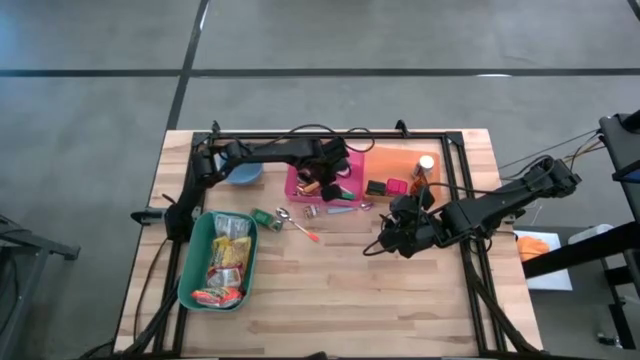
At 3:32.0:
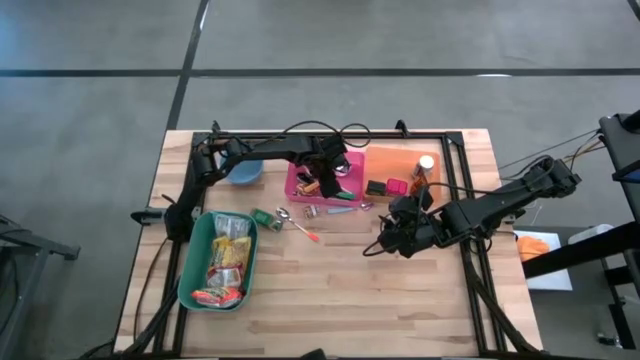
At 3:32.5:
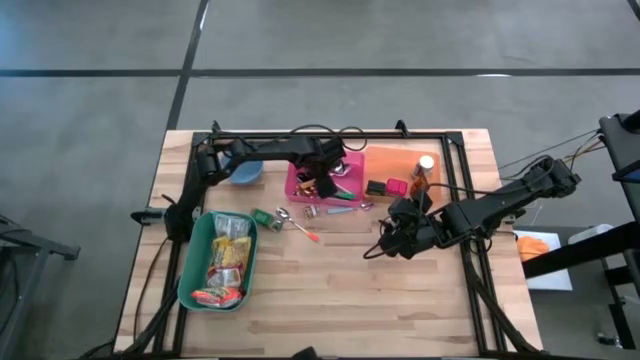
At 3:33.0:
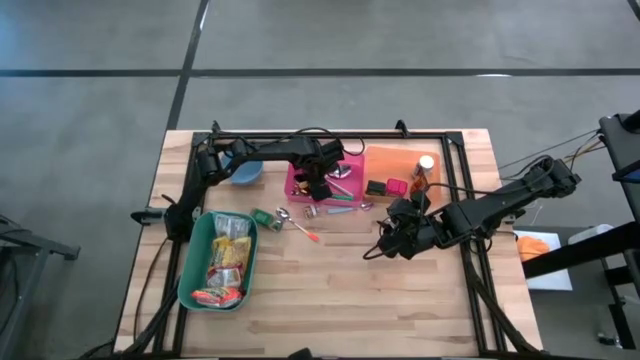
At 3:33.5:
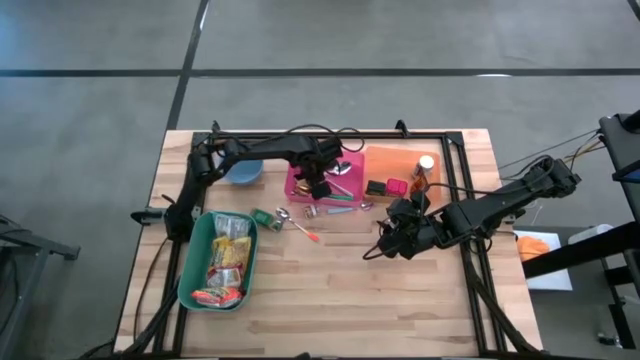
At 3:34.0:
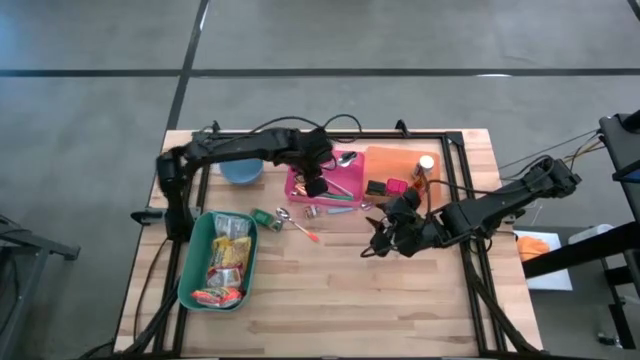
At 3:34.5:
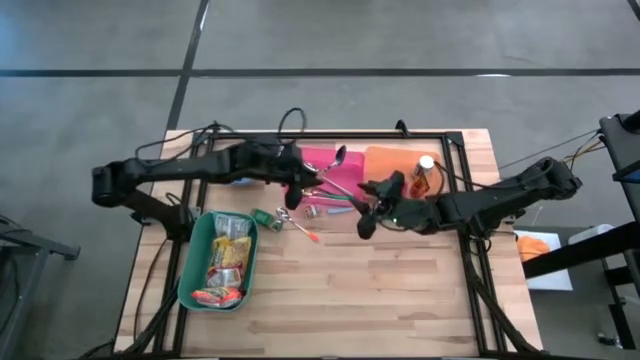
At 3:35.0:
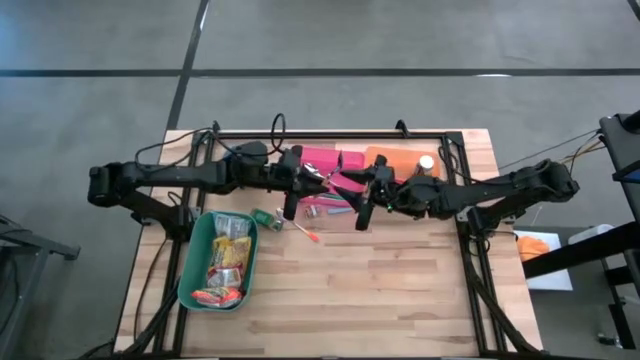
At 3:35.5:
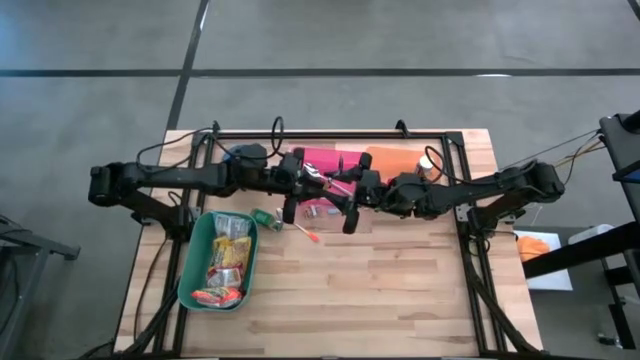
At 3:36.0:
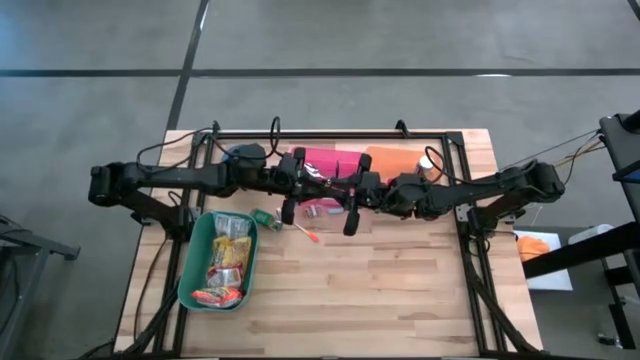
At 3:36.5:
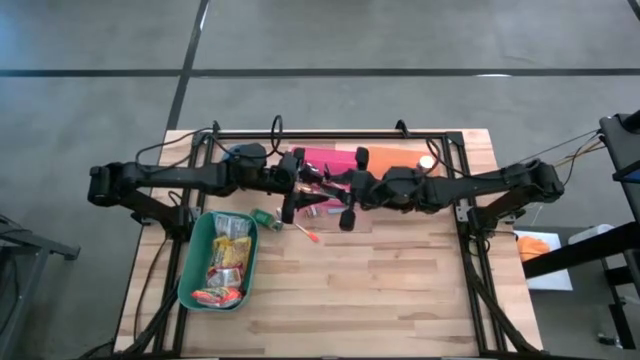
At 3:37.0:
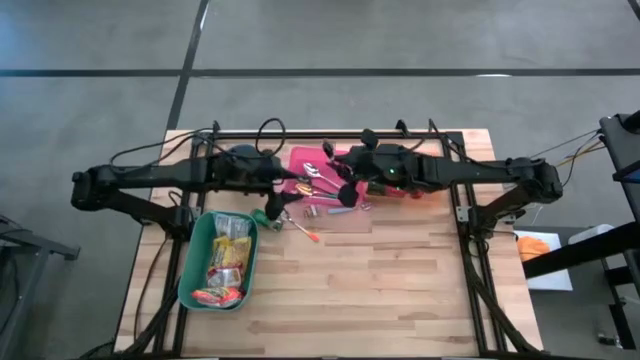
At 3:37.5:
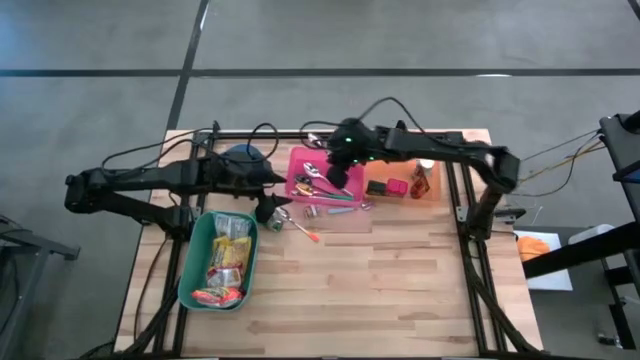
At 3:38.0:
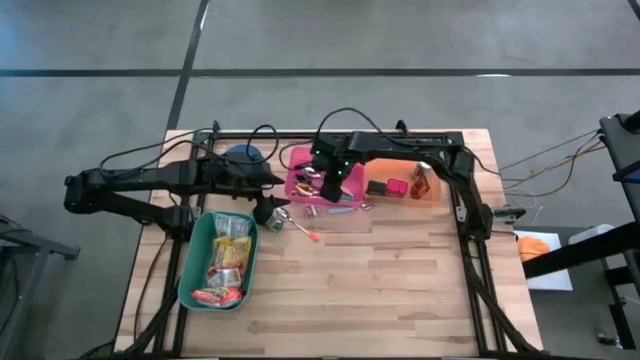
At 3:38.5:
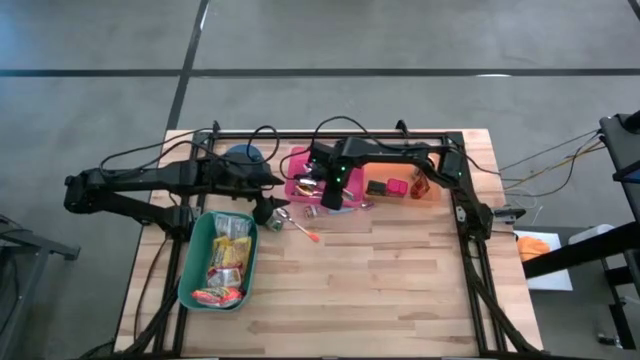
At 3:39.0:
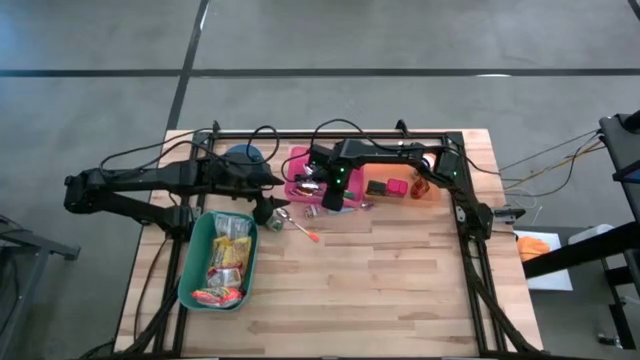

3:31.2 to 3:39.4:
Put the yellow spoon into the pink bin

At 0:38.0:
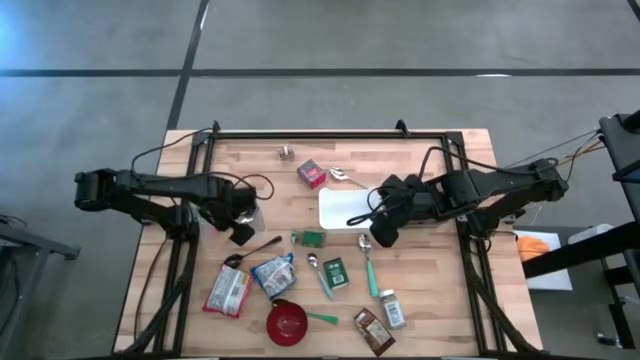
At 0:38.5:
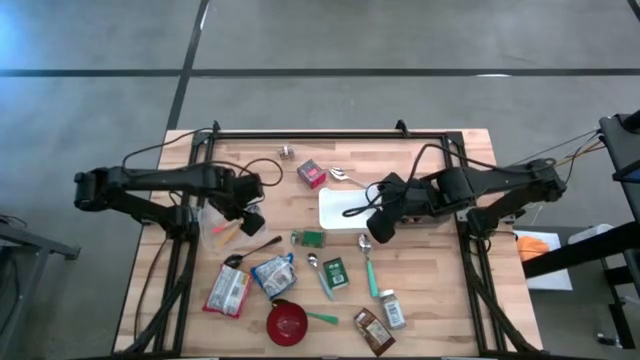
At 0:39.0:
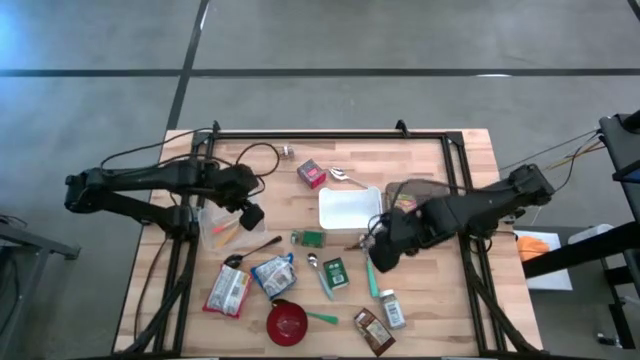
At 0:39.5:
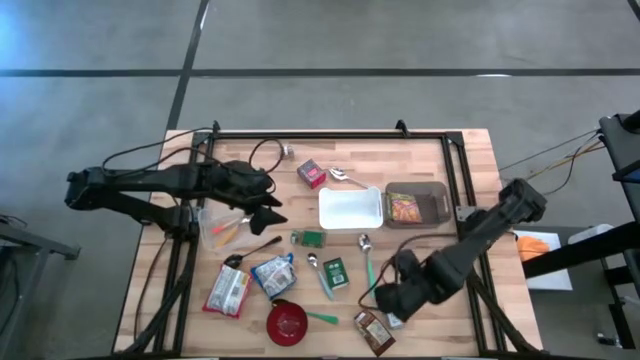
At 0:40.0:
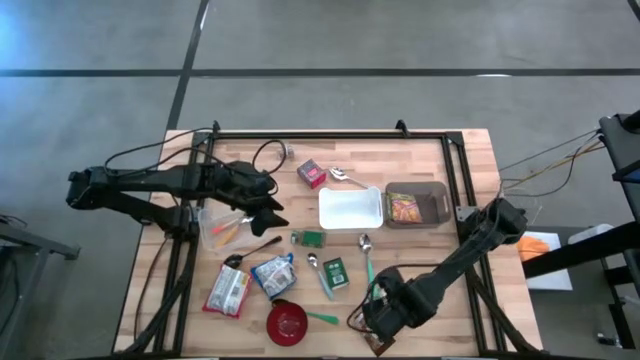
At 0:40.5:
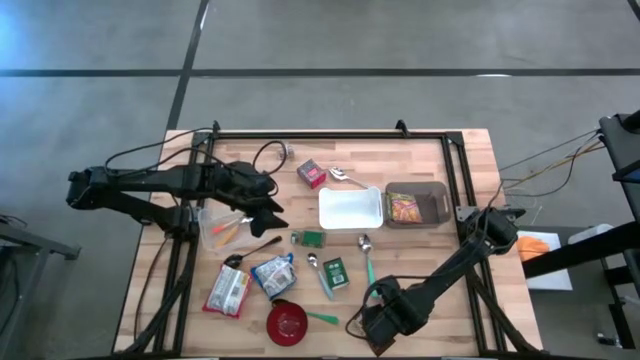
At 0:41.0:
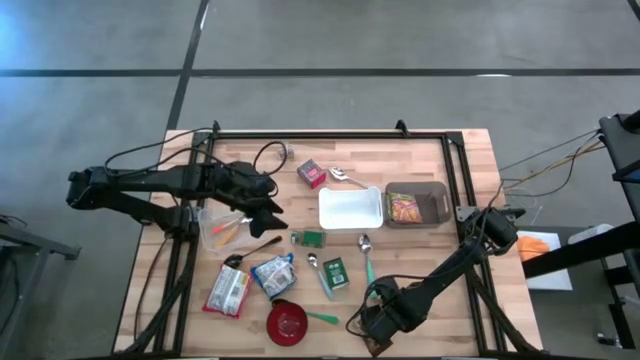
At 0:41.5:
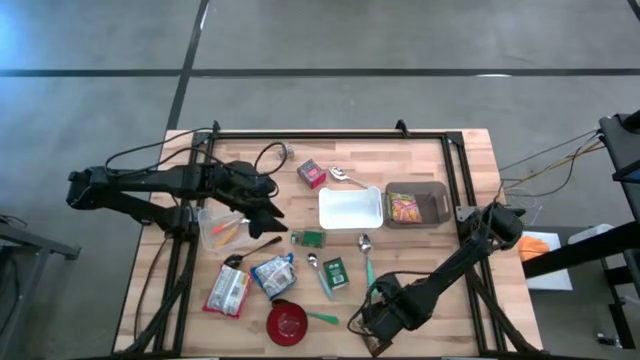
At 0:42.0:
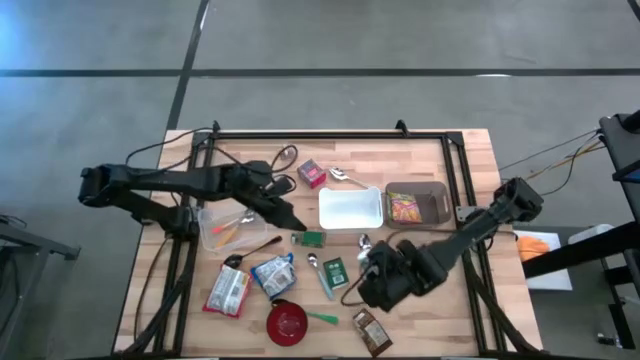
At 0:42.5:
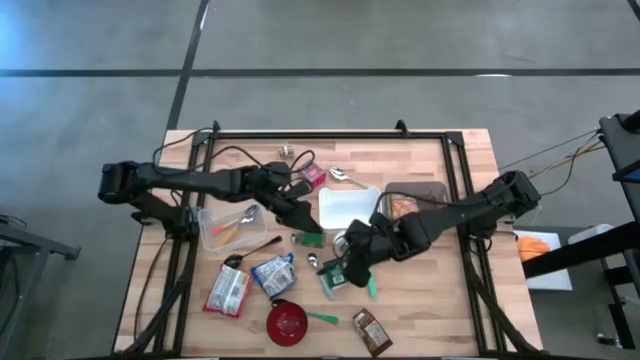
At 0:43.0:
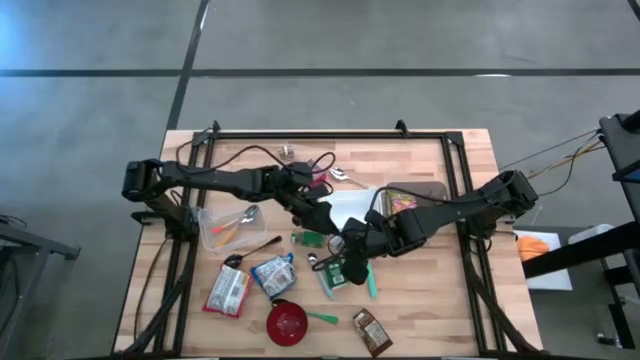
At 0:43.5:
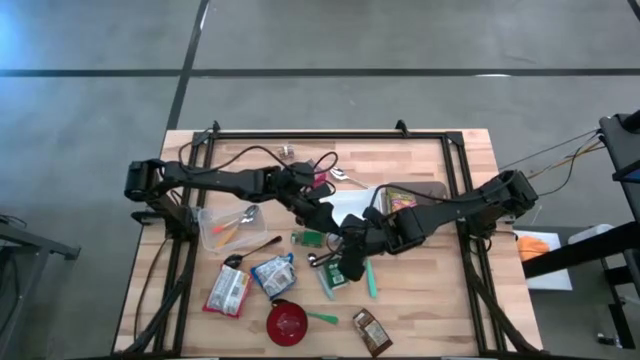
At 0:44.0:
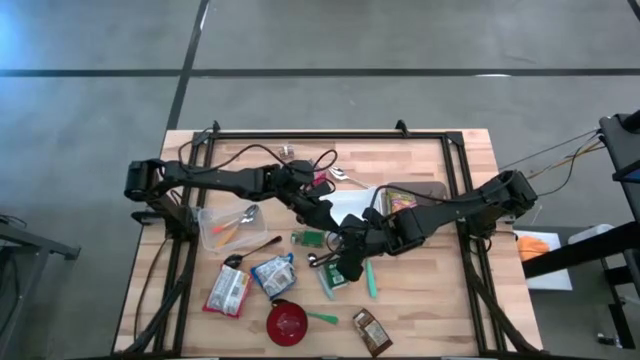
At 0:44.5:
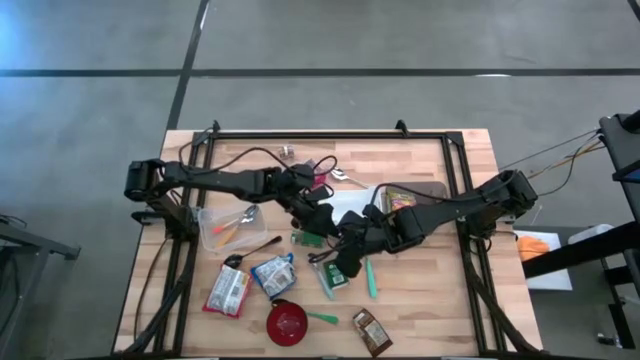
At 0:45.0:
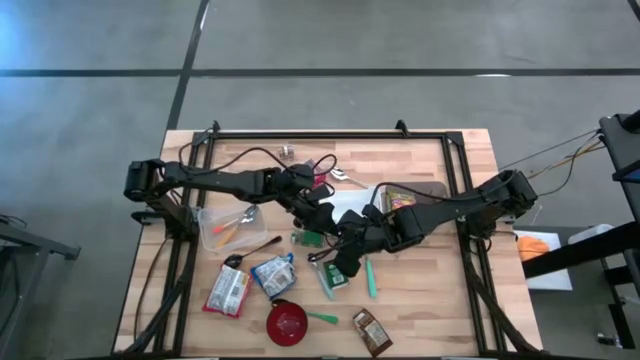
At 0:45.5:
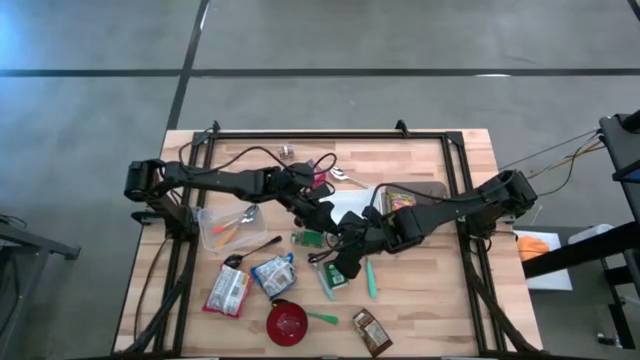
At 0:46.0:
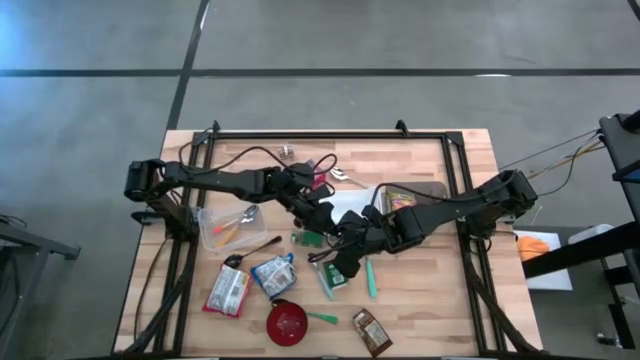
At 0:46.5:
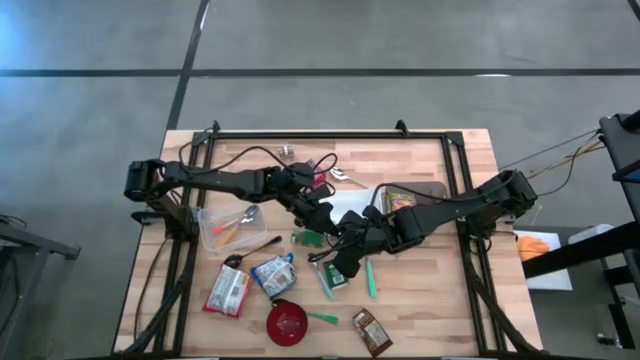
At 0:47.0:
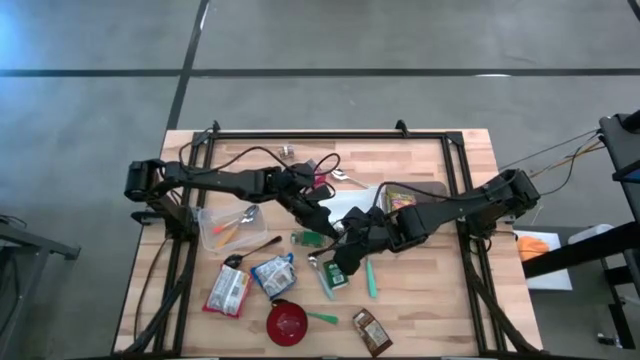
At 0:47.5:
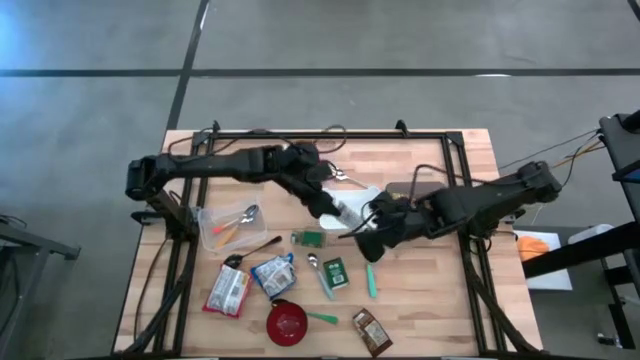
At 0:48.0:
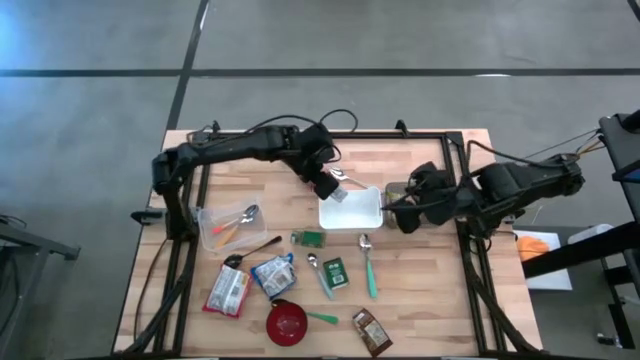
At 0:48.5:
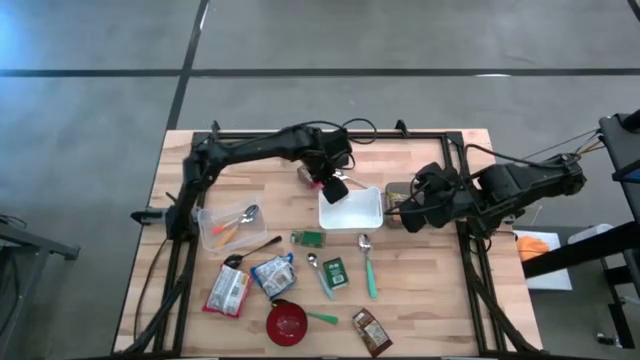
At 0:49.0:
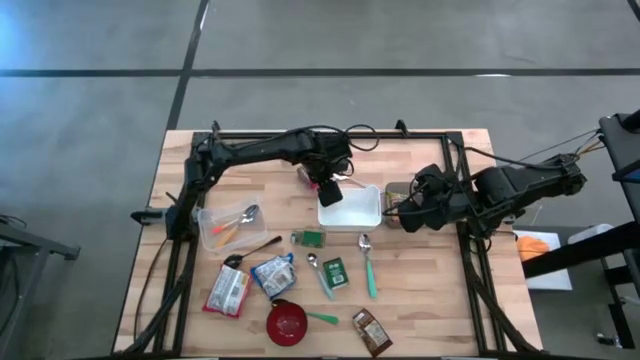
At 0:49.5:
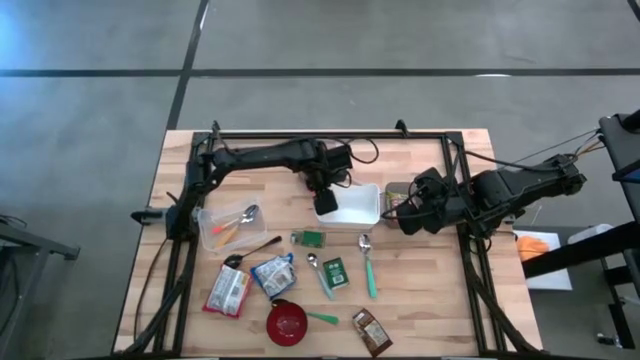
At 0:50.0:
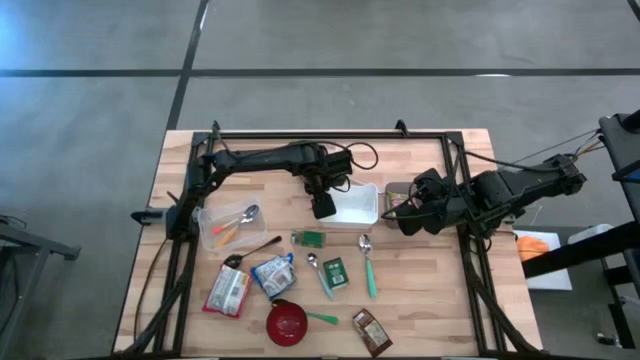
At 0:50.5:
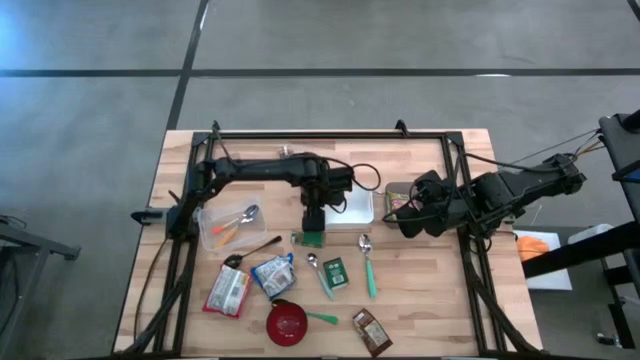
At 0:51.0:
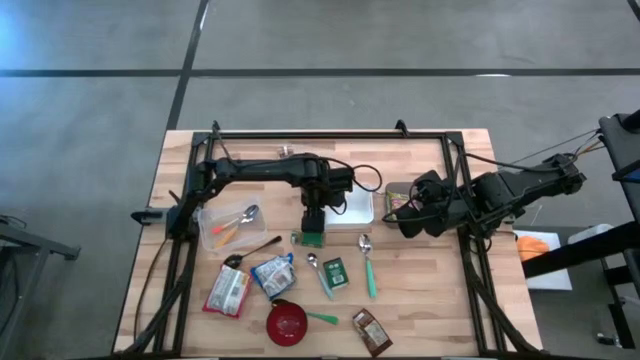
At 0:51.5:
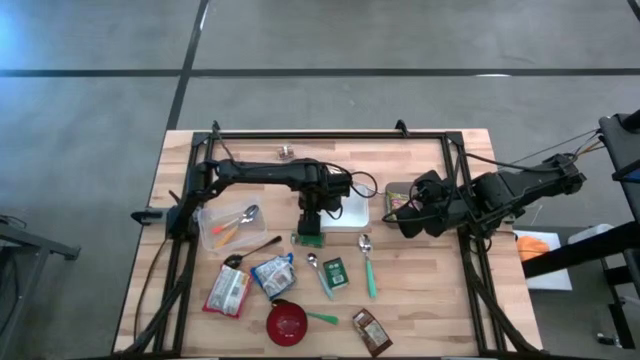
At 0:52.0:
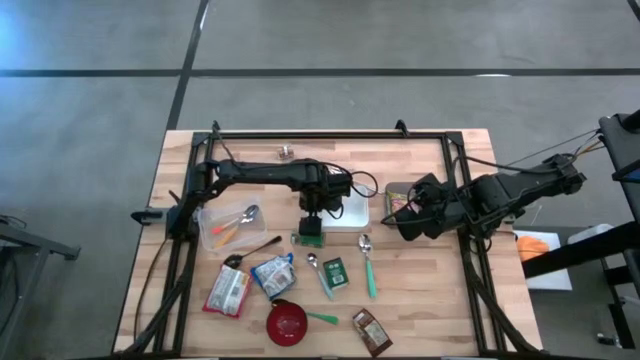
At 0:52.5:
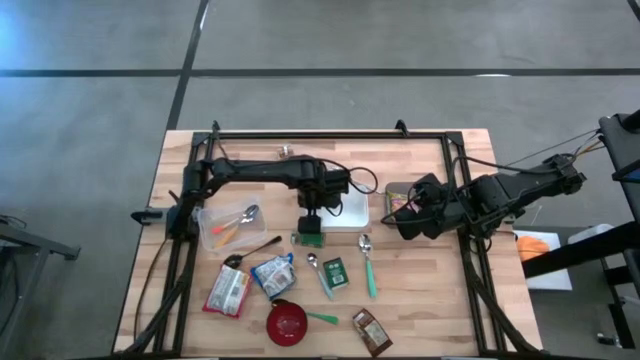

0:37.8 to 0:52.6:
Put the white seasoning bottle into the white bin
